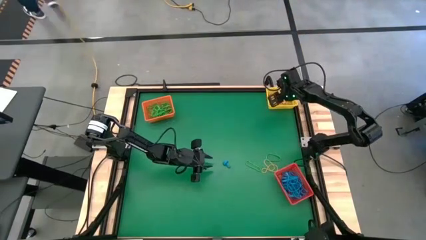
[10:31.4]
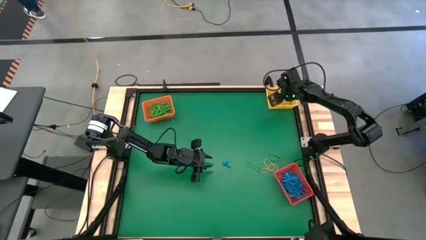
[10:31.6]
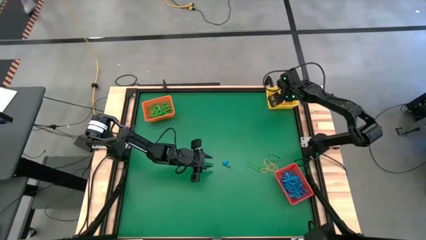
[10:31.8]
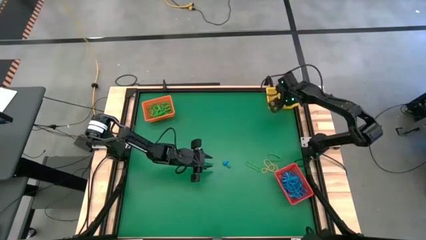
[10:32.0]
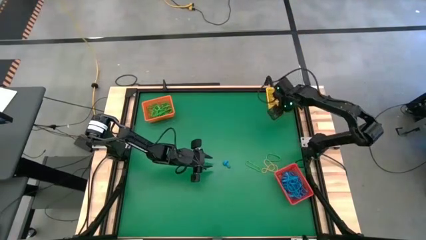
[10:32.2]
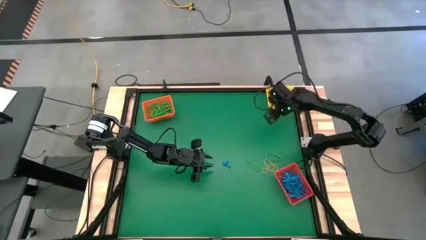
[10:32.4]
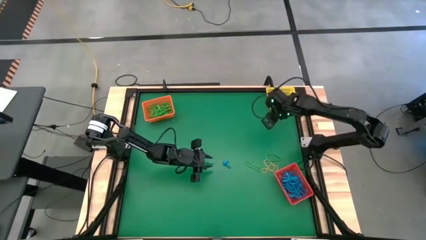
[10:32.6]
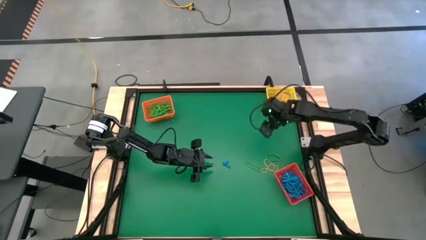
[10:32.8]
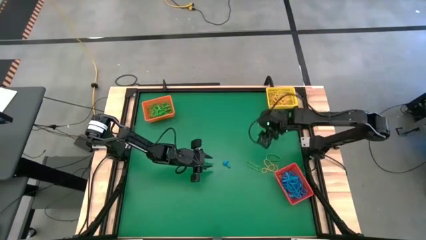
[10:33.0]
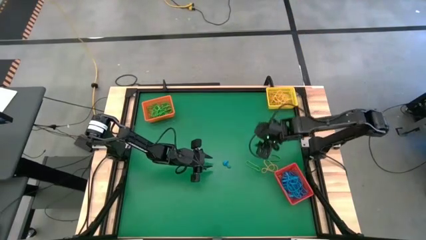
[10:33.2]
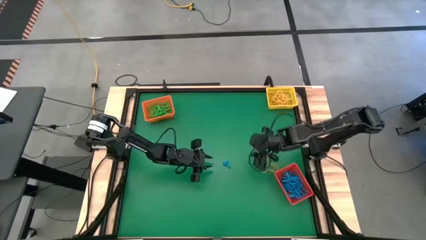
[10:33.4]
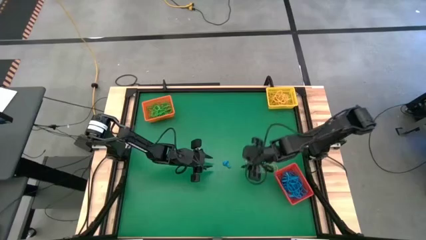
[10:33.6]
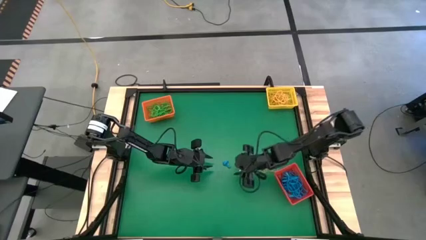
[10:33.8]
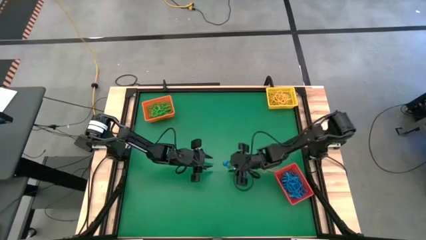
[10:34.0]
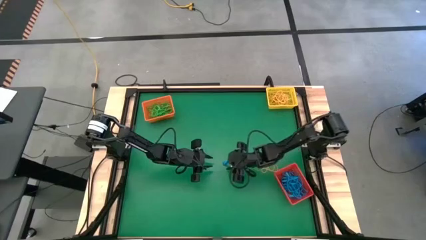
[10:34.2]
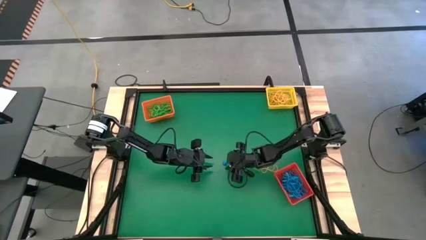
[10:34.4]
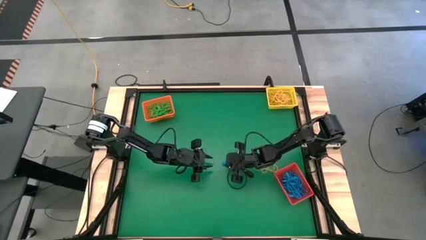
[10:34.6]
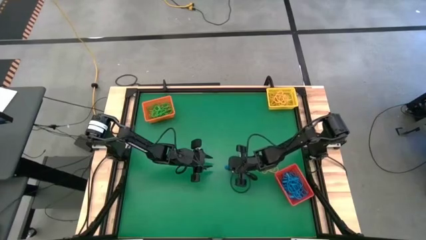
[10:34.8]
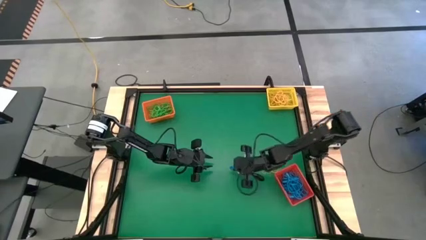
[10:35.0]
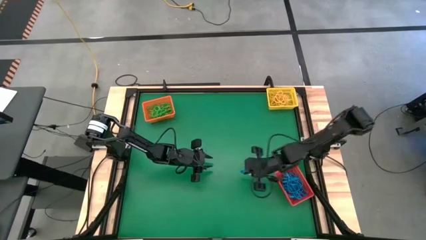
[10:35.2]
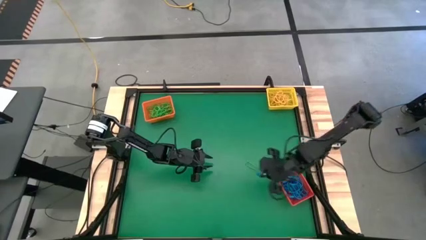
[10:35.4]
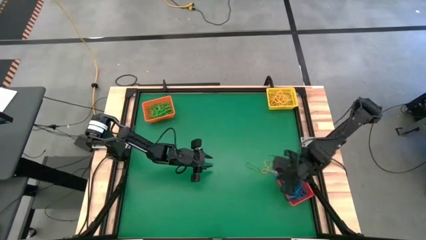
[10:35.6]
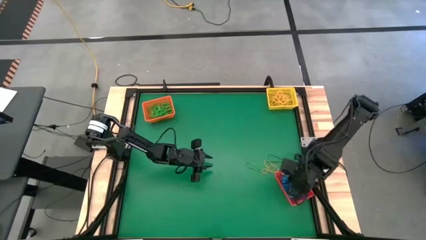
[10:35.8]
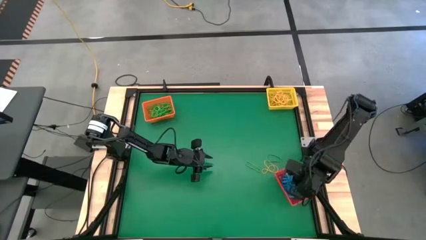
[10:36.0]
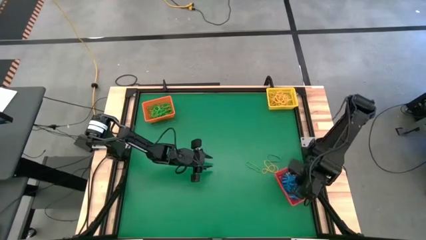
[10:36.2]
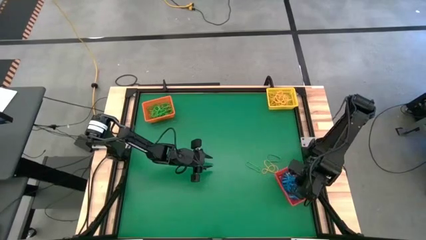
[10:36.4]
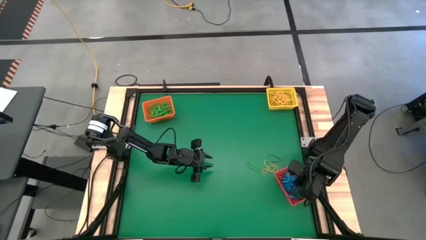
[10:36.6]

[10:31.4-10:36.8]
Task: Sort rubber bands into baskets
Put the blue rubber band into the red bin

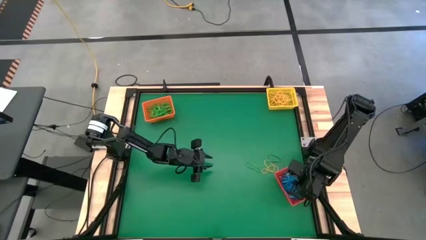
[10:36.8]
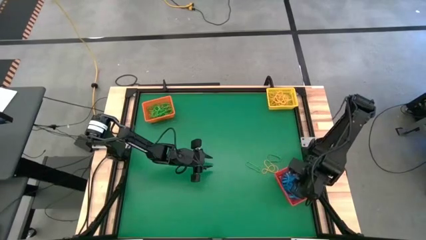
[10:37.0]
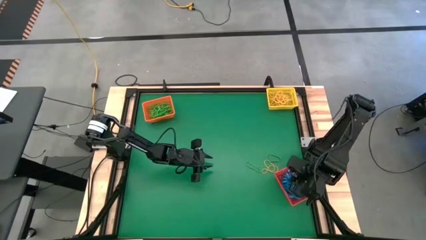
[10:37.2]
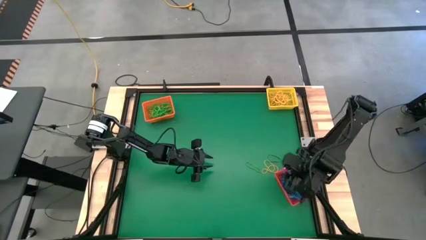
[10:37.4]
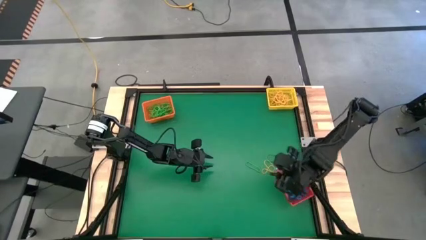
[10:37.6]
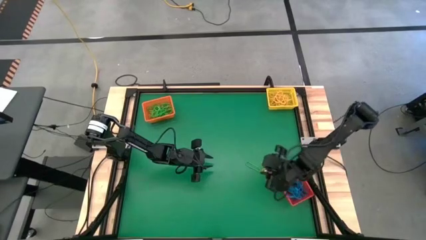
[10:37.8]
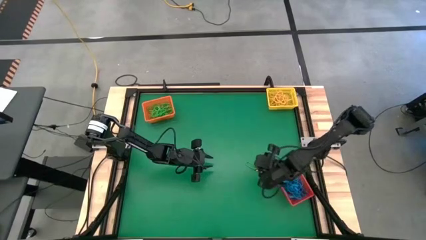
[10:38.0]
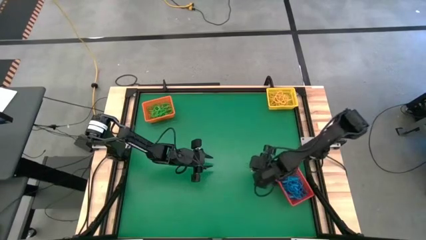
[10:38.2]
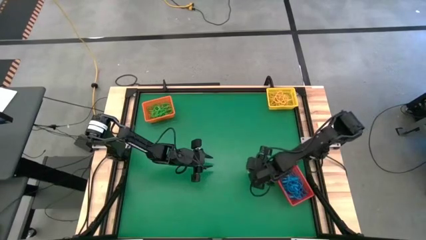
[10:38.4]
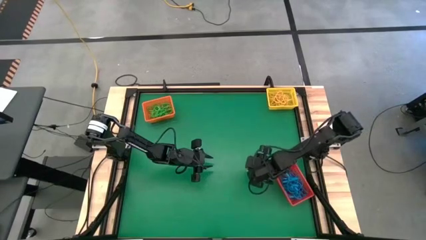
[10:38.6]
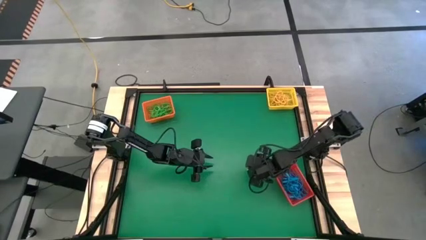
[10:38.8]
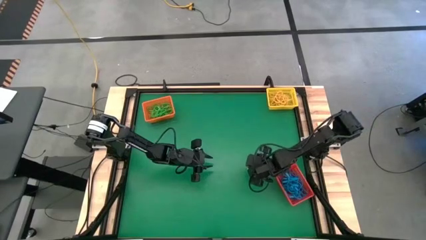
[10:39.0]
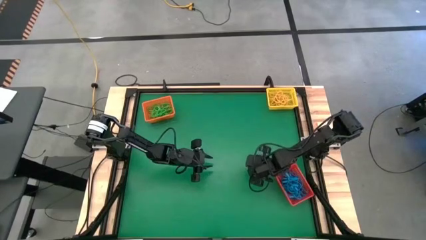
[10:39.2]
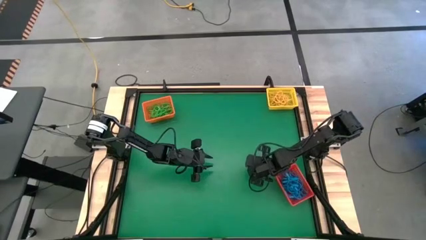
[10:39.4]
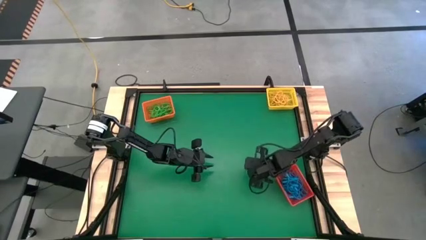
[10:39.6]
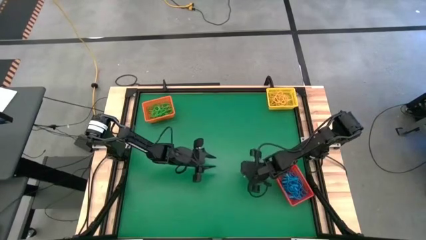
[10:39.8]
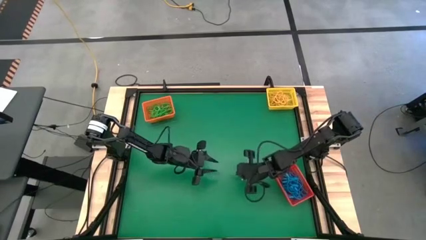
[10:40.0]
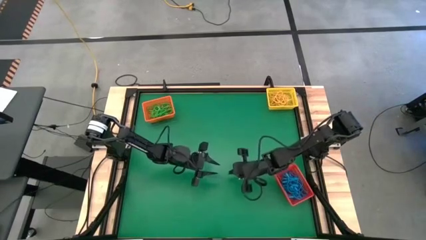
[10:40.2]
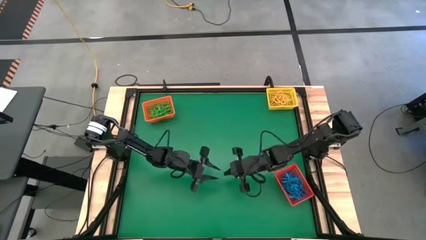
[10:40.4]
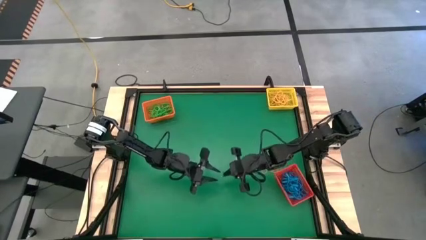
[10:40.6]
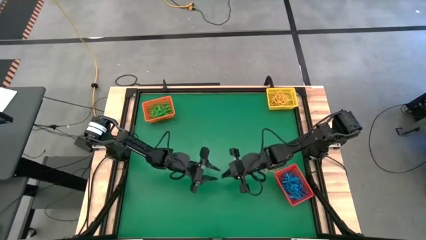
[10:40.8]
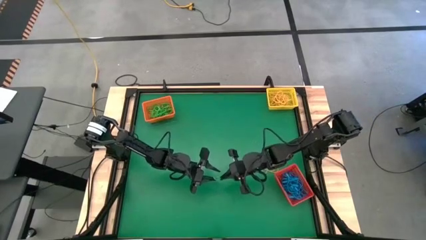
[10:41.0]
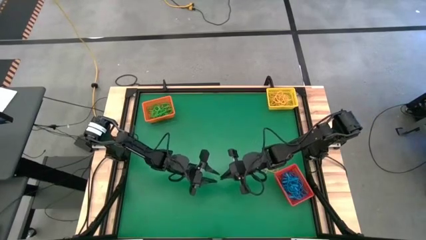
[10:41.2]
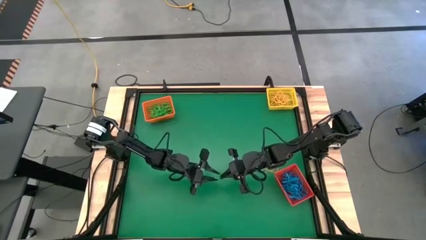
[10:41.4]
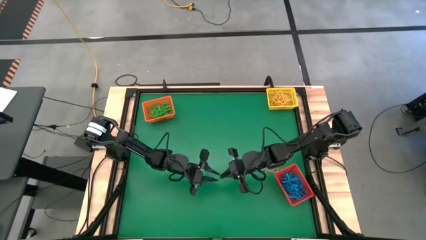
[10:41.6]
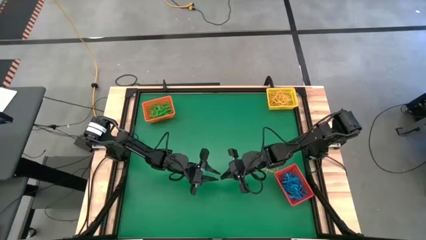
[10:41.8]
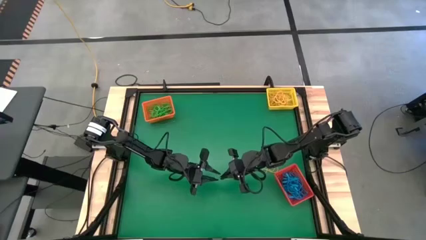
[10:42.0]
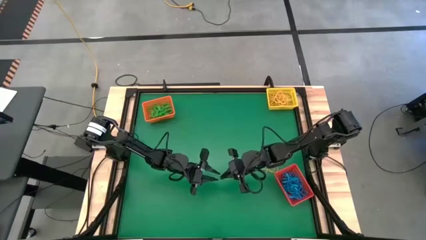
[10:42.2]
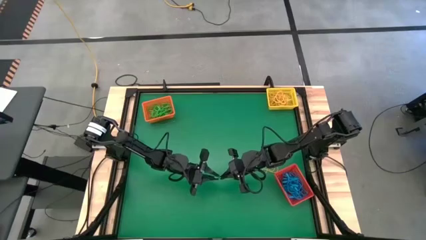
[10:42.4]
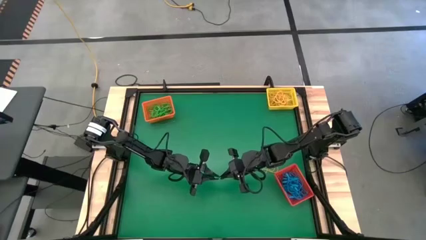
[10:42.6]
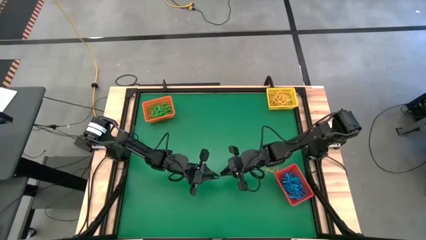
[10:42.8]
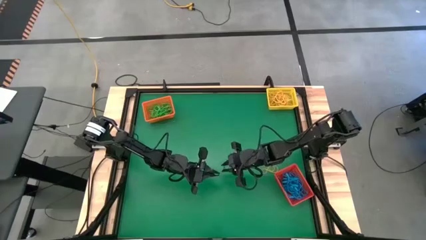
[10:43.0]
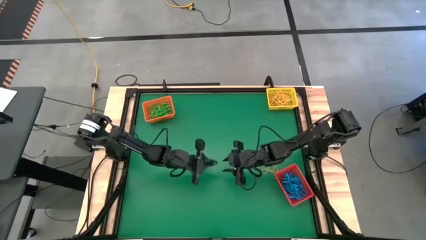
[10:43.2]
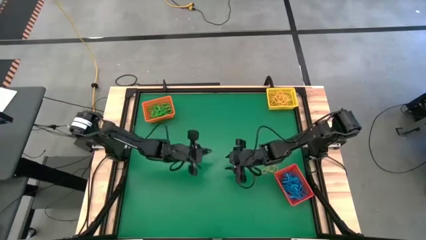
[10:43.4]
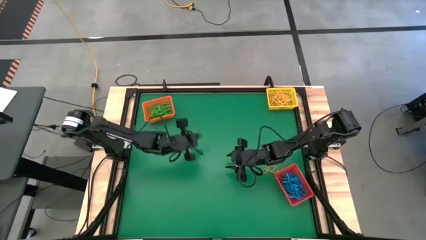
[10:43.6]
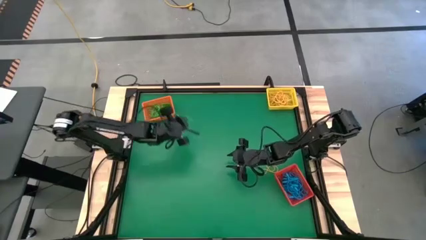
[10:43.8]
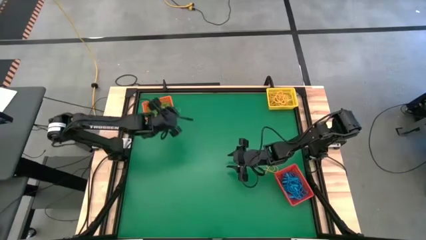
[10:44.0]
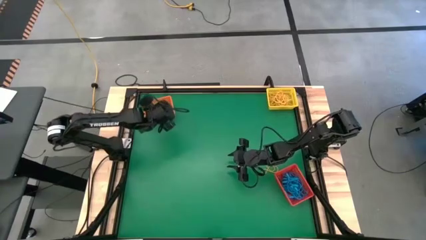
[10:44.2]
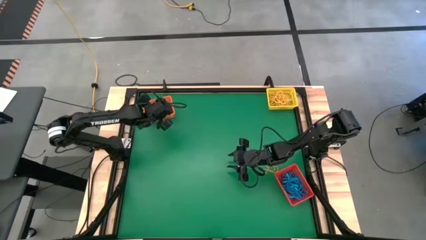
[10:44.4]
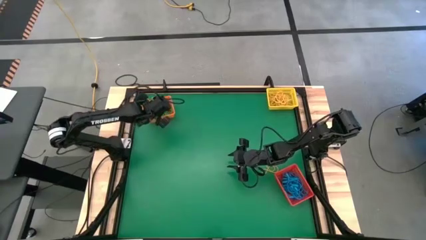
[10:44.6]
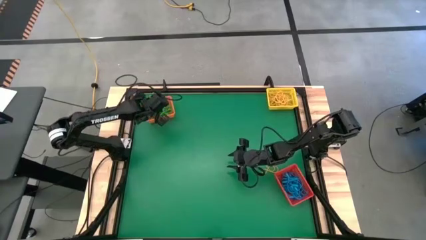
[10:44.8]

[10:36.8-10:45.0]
Put the green rubber band into the orange bin

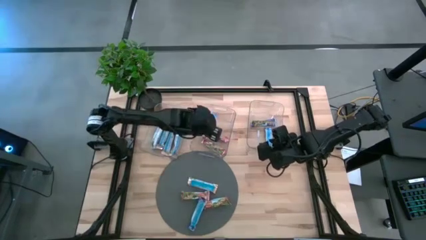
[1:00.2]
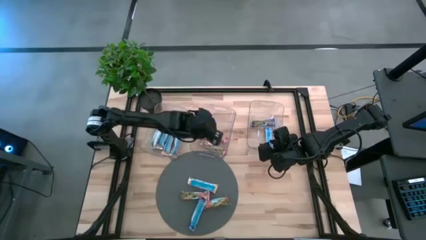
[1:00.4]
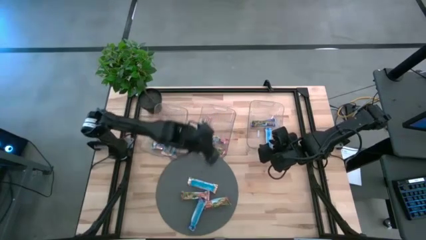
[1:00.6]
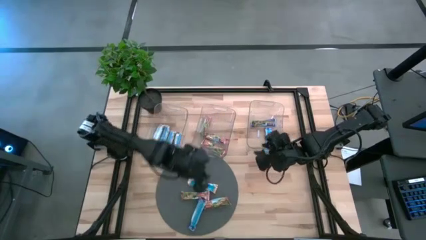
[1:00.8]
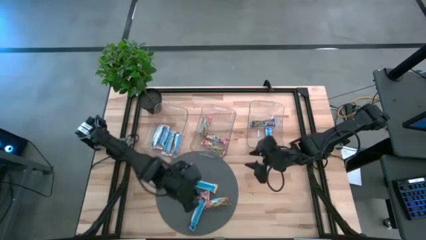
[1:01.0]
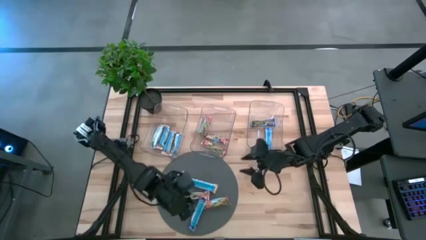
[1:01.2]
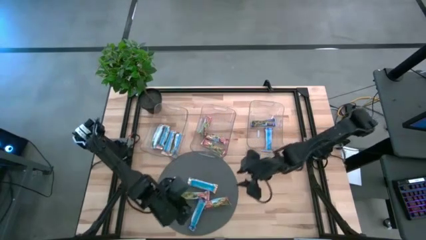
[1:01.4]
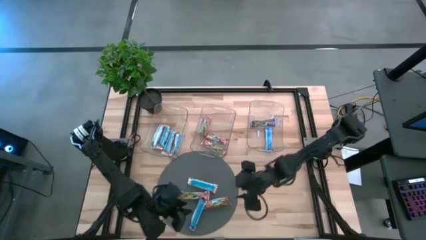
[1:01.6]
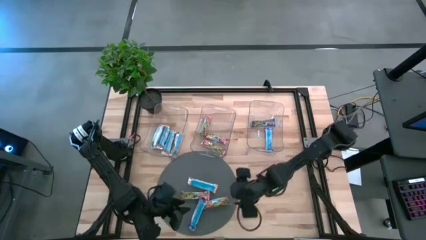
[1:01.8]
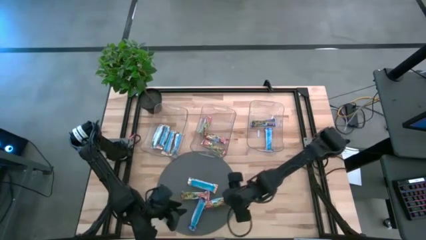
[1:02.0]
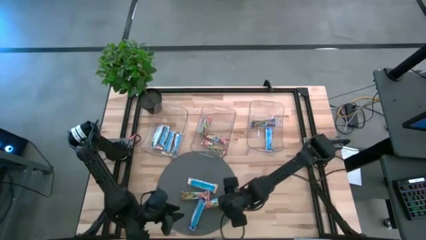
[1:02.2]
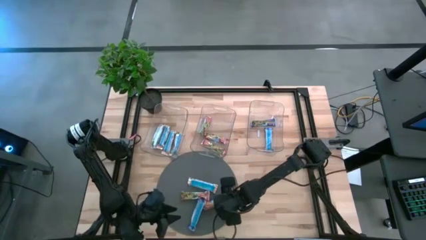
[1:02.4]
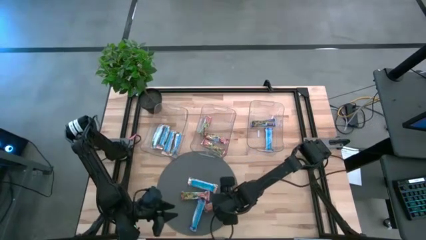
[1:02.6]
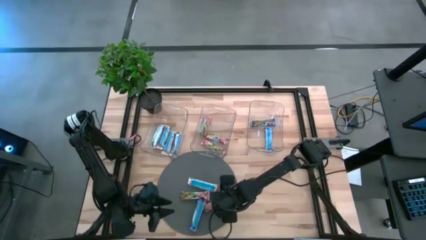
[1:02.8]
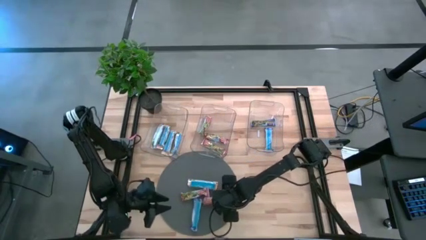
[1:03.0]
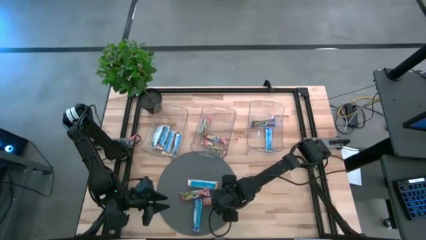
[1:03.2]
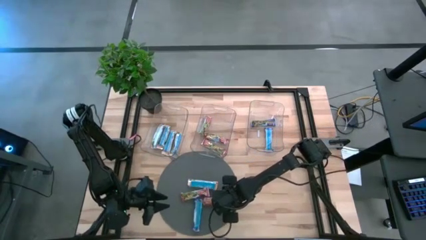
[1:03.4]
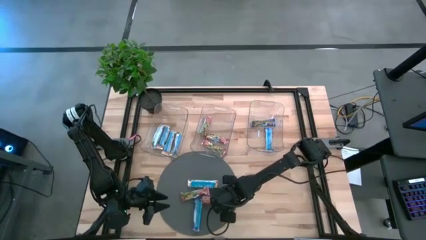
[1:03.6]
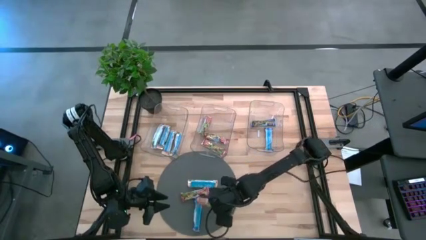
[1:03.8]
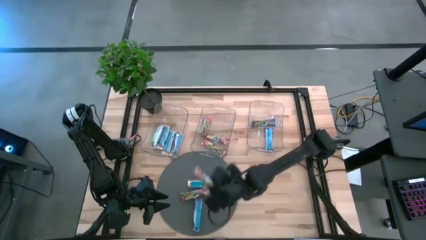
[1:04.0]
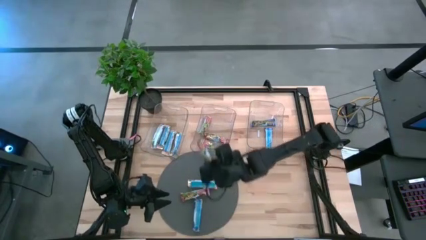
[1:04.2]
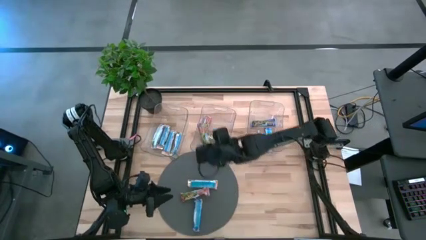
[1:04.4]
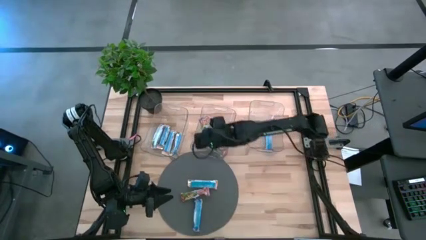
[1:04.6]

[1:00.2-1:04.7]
Task: Pick and place Granola Bars by type
Put the red granola bar into the middle transparent bin
